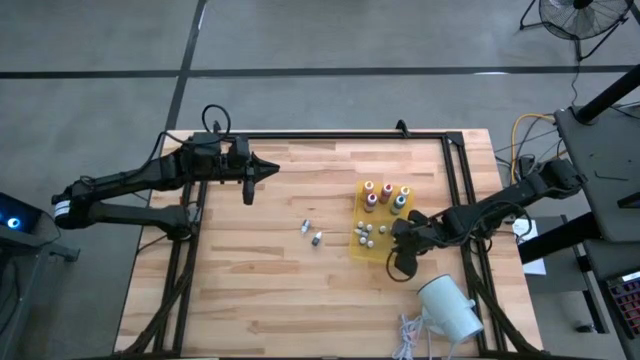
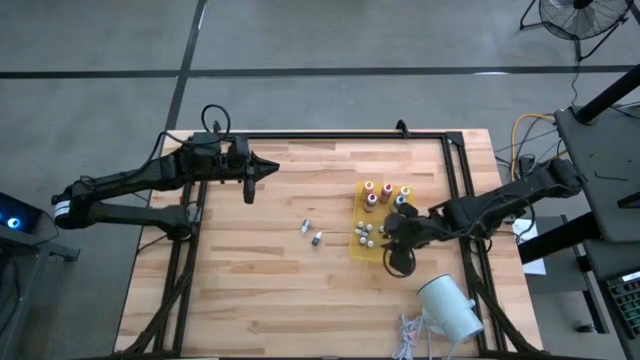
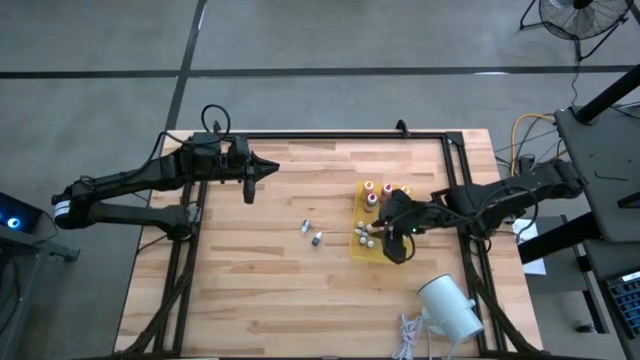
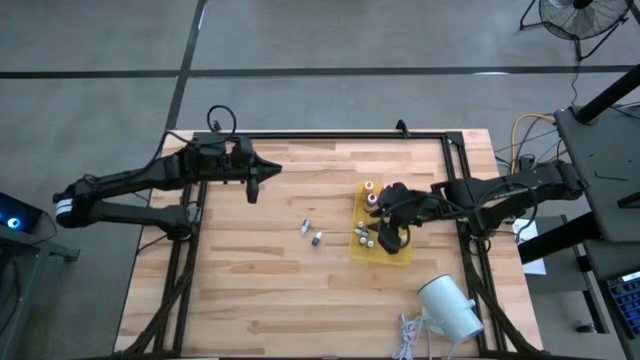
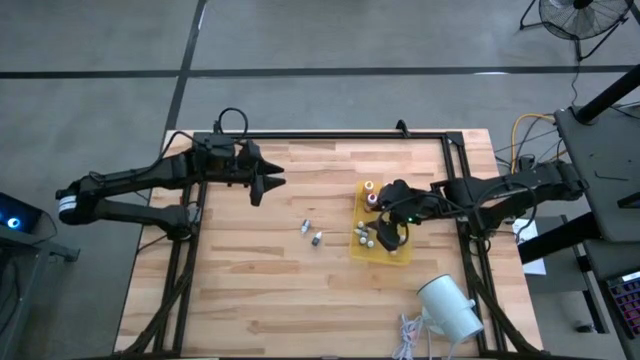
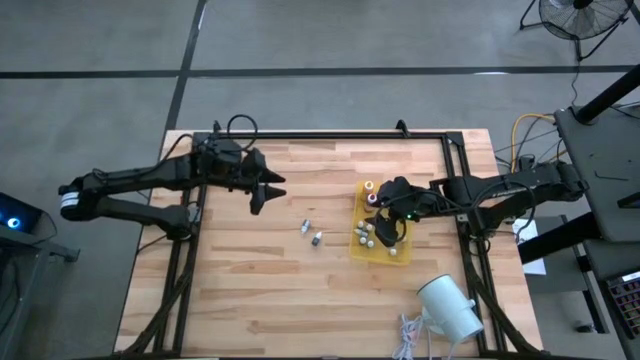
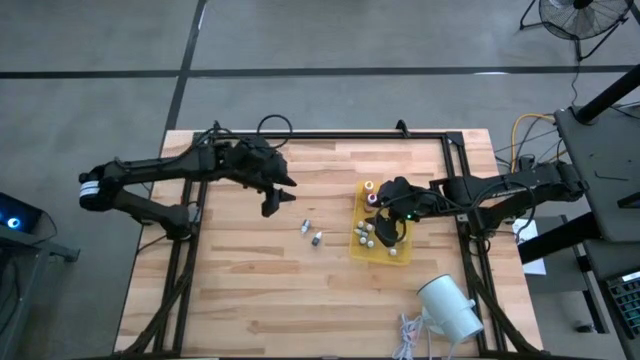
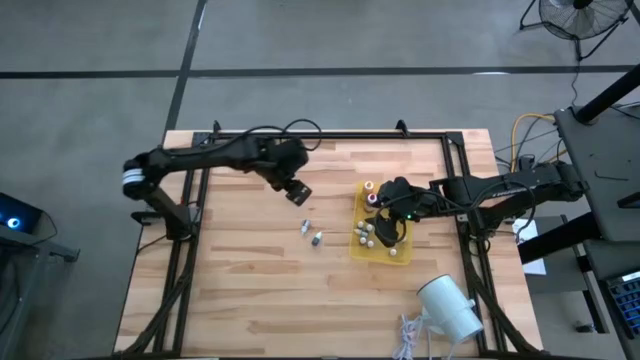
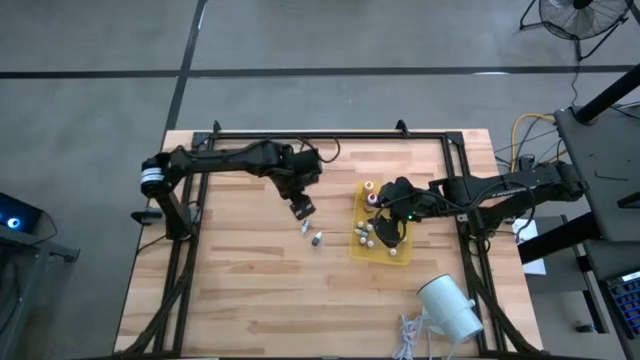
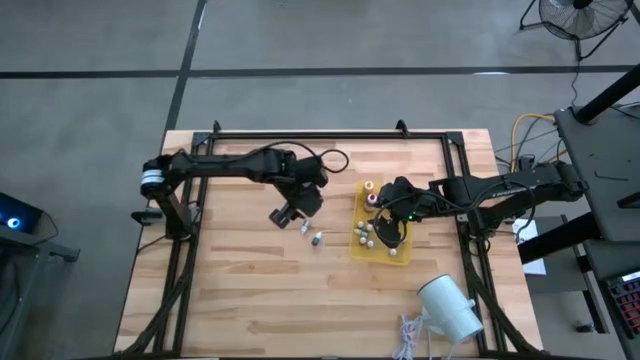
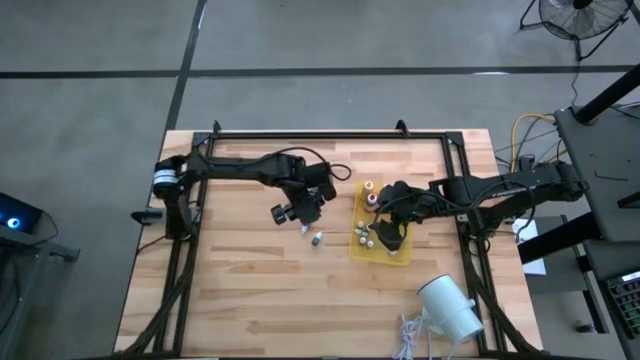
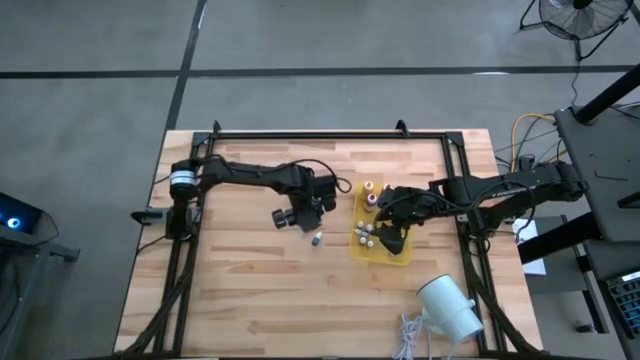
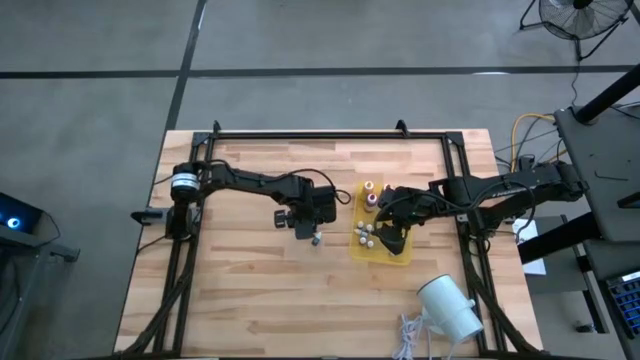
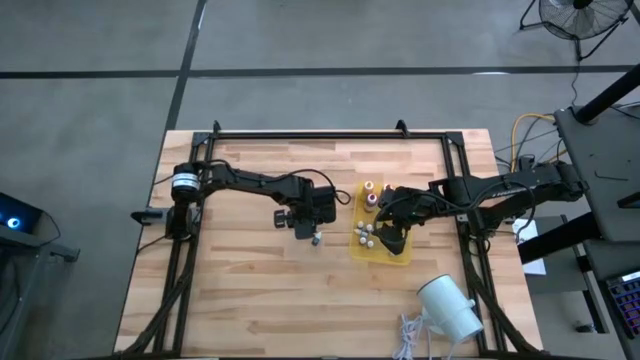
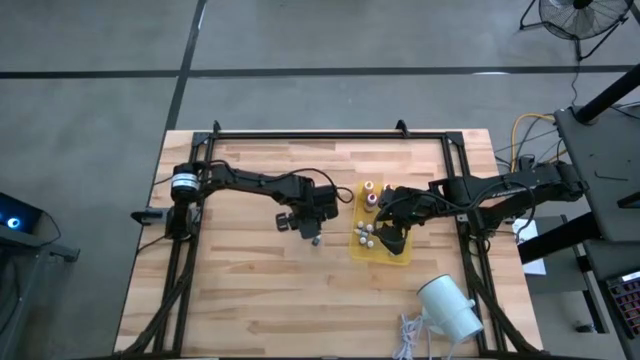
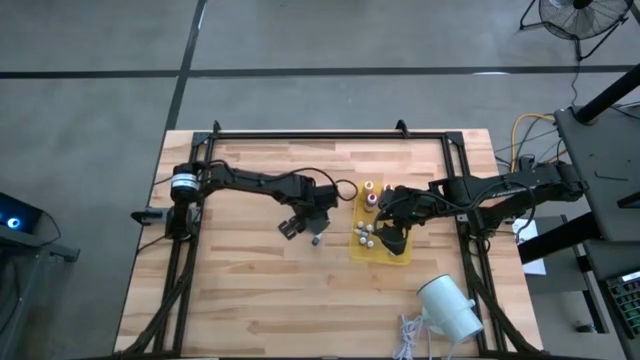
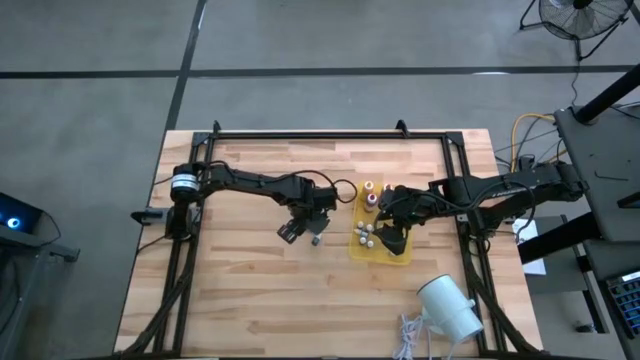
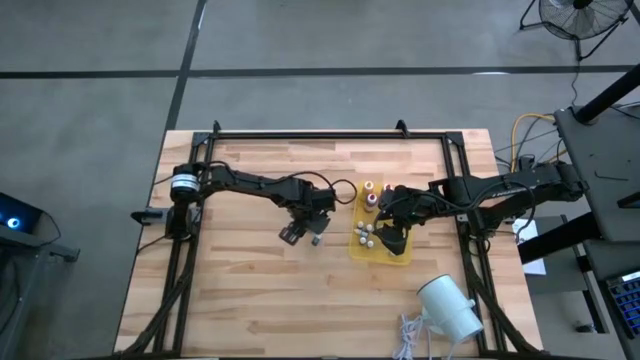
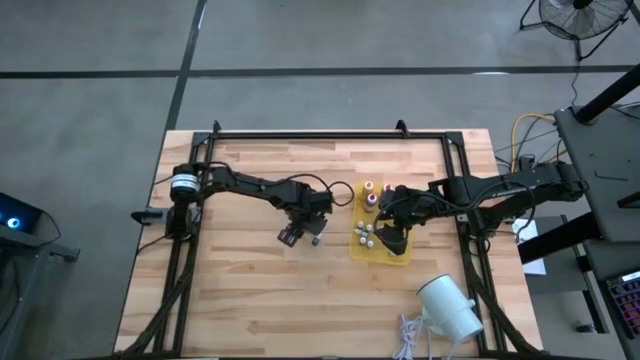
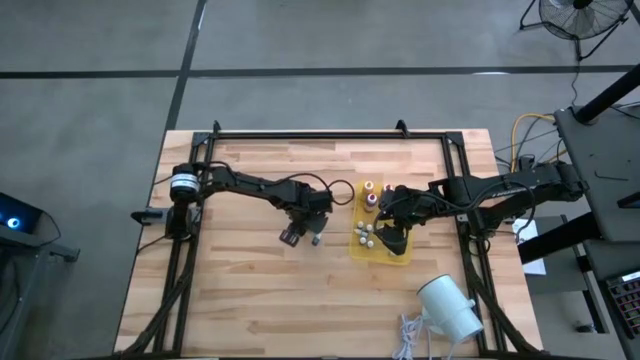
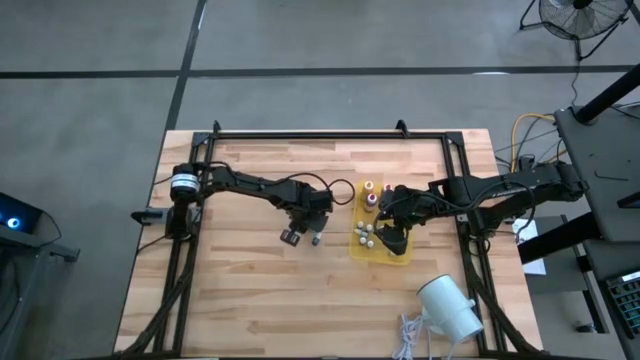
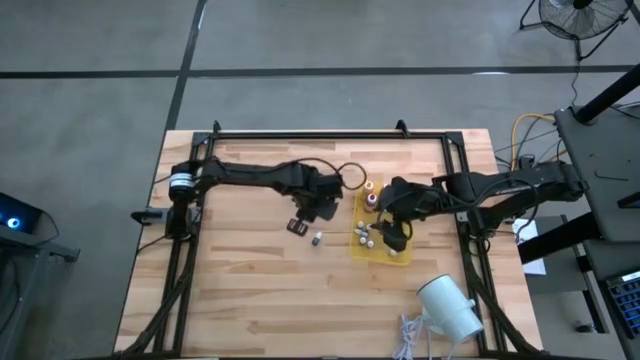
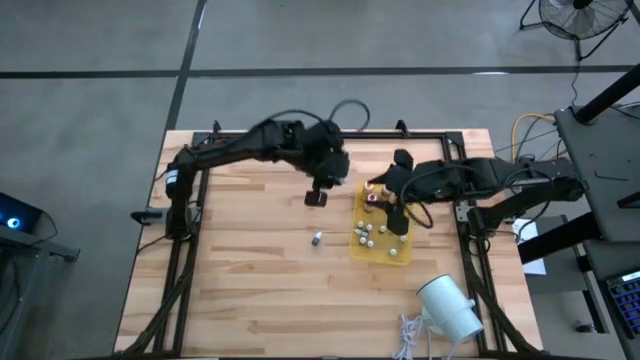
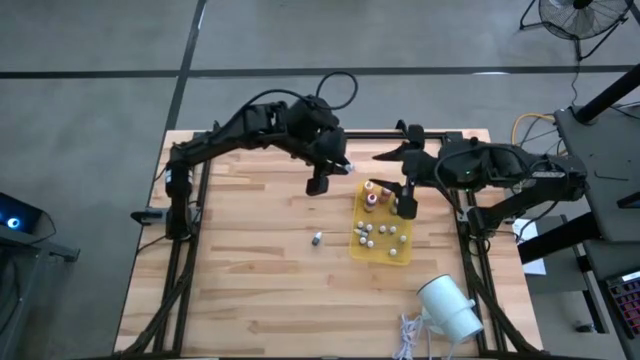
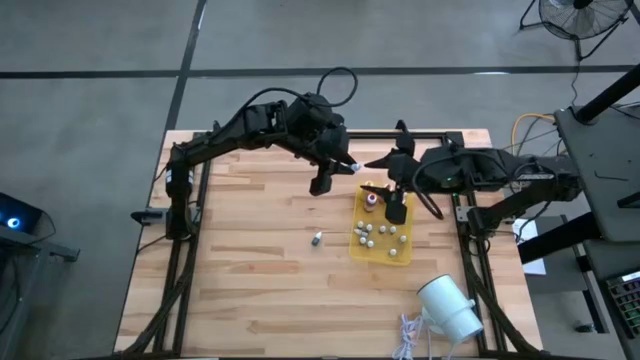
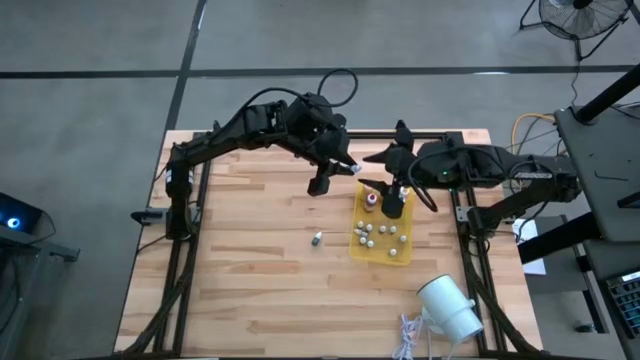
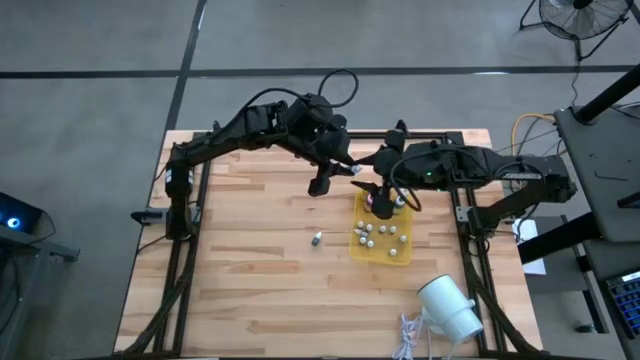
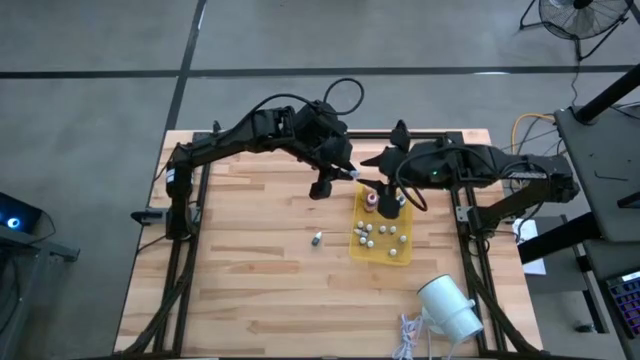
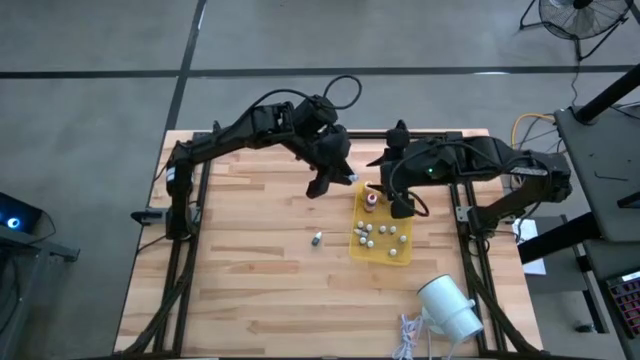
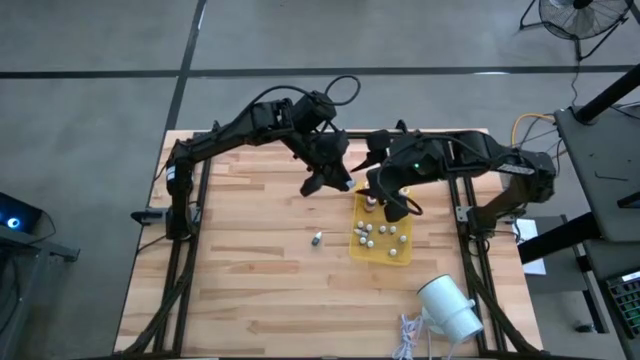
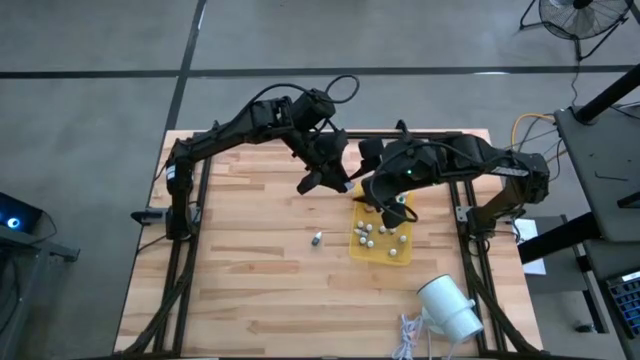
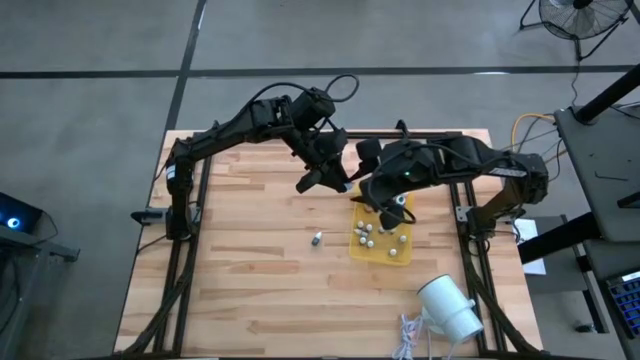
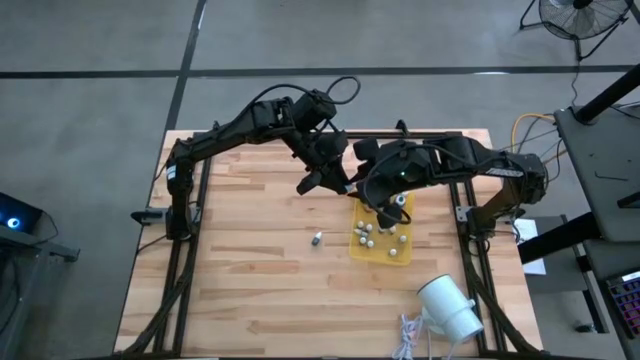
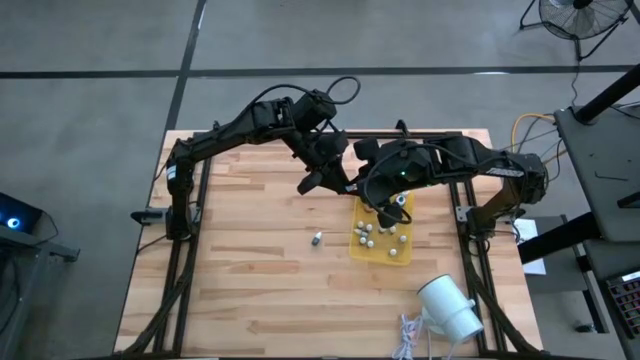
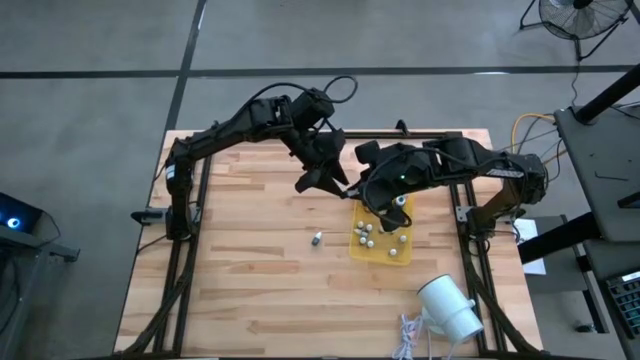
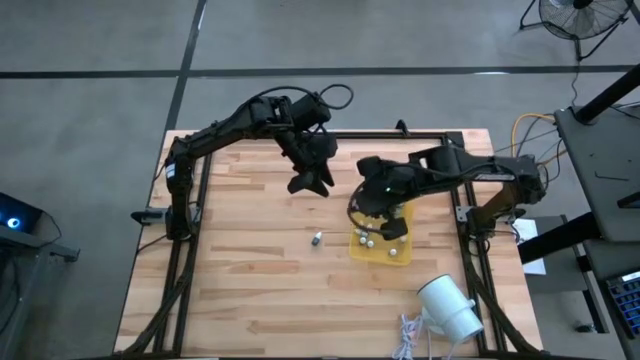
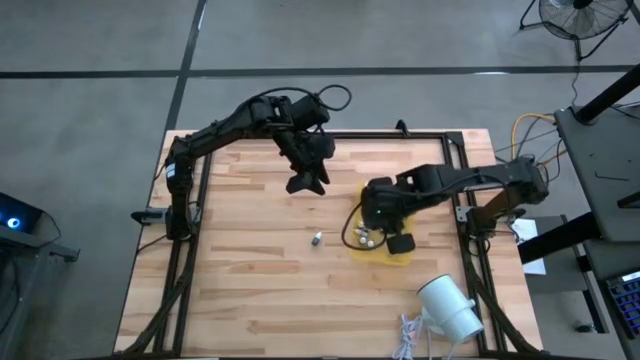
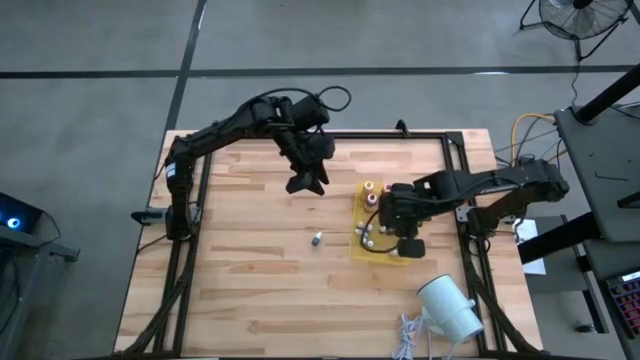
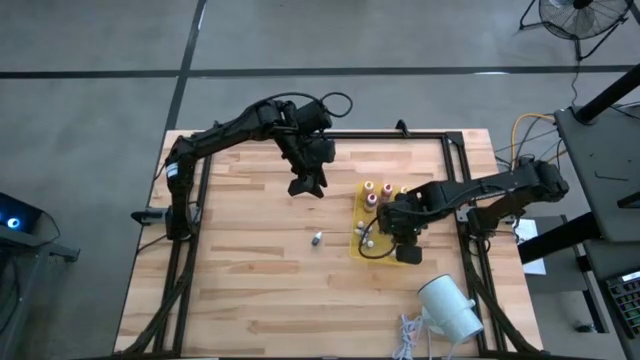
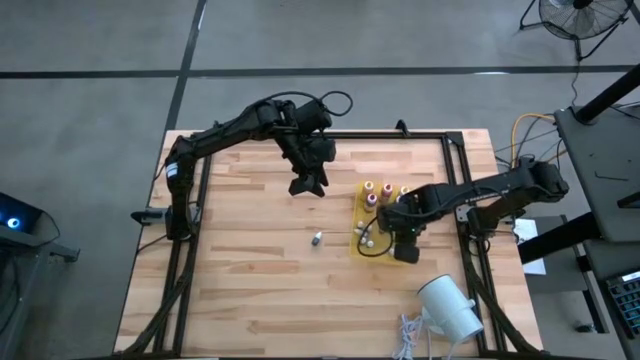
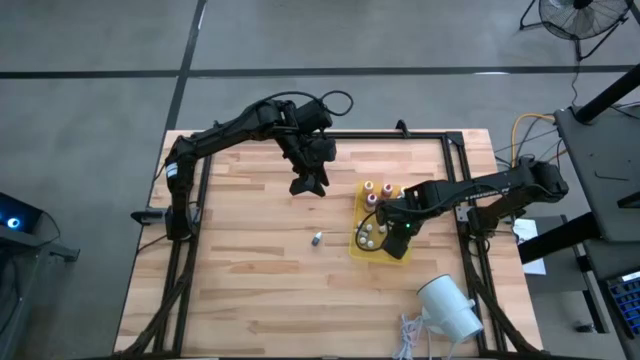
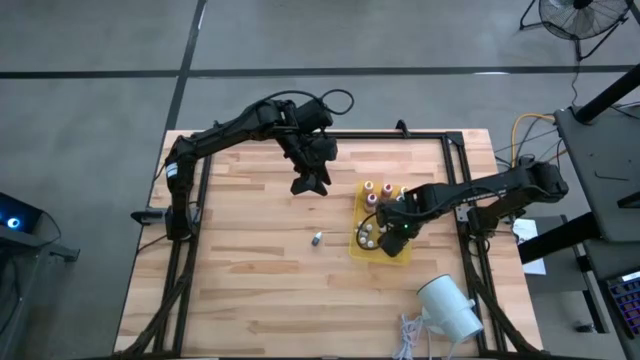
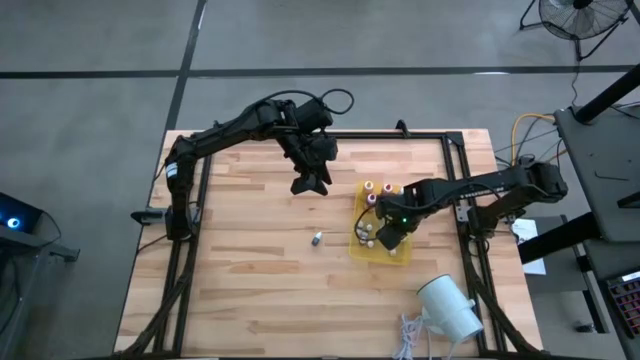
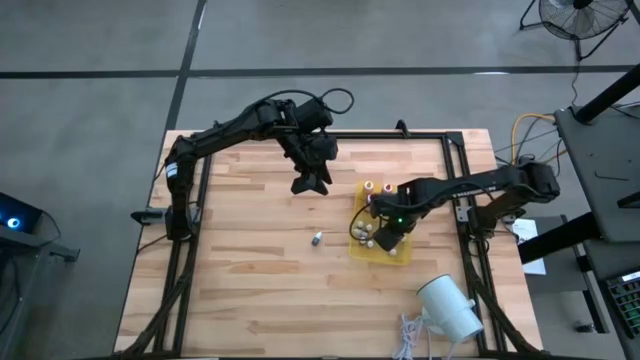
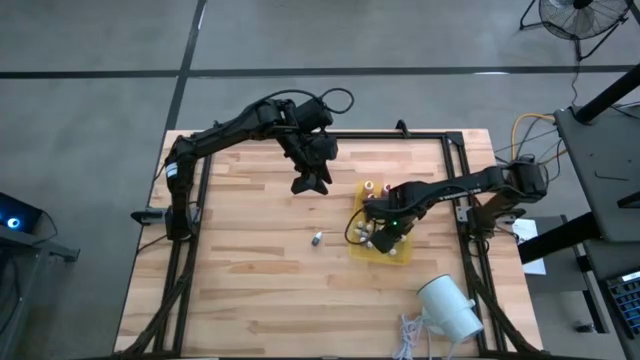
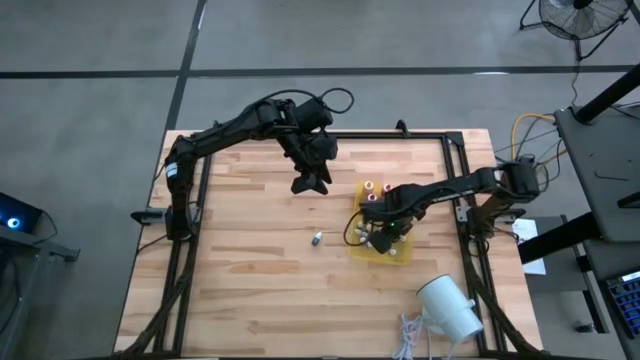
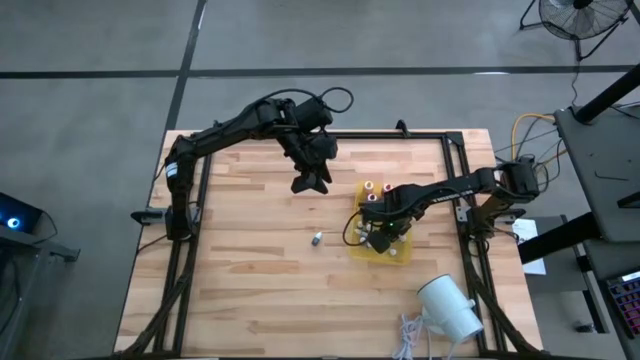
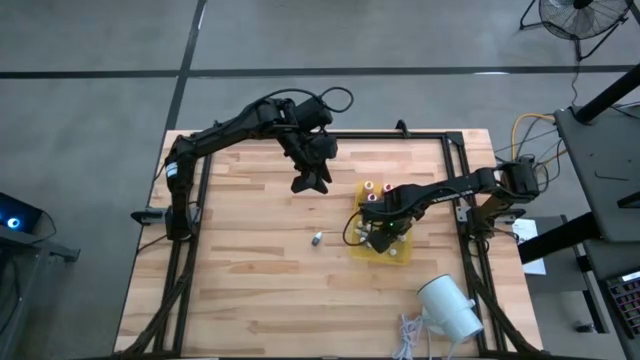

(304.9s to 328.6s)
Task: Pick & Place food coloring
Put the top small dark blue food coloring bottle into the yellow bin
